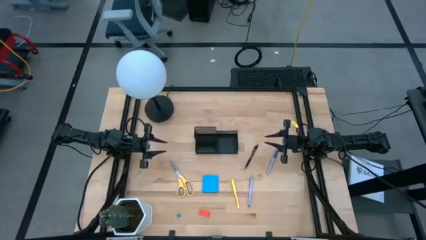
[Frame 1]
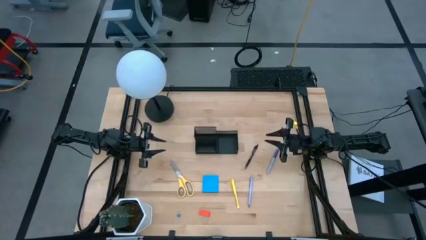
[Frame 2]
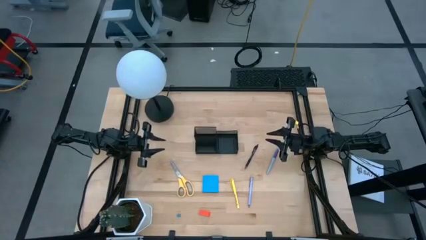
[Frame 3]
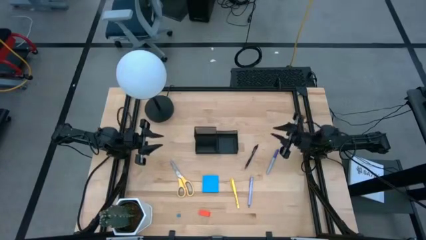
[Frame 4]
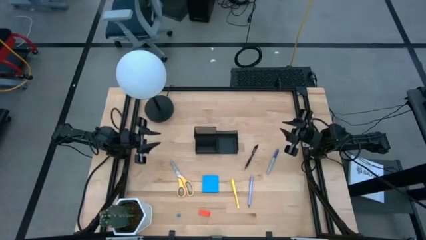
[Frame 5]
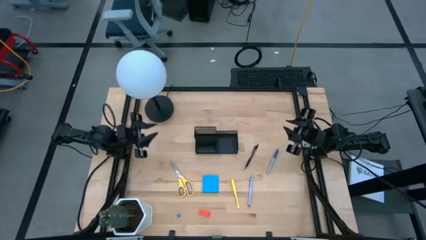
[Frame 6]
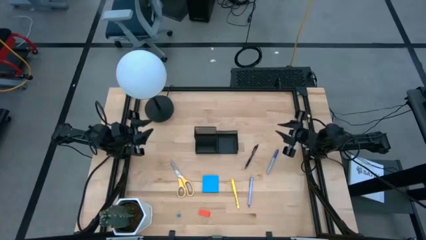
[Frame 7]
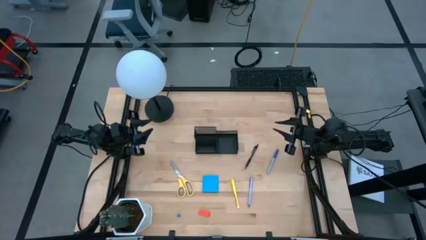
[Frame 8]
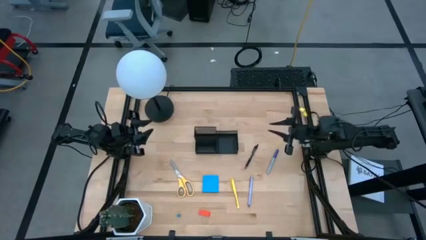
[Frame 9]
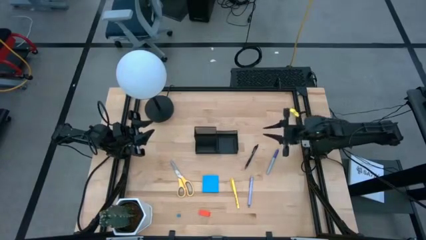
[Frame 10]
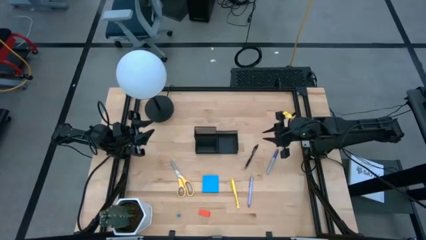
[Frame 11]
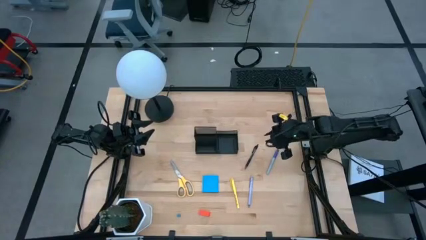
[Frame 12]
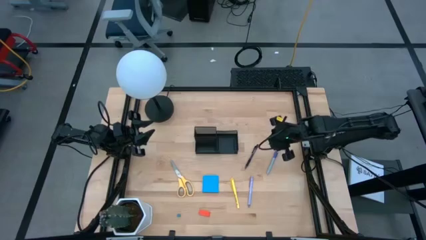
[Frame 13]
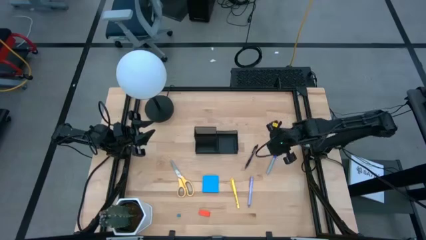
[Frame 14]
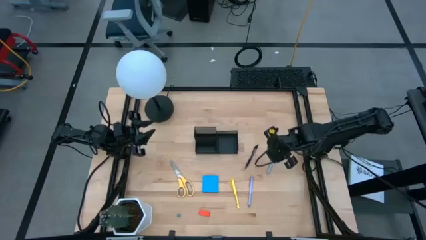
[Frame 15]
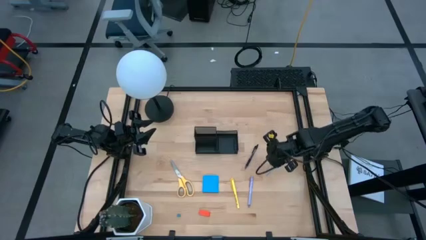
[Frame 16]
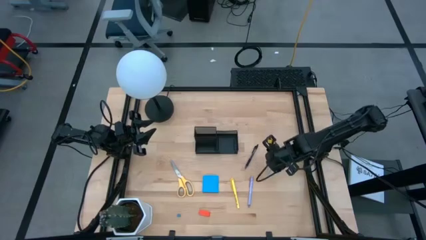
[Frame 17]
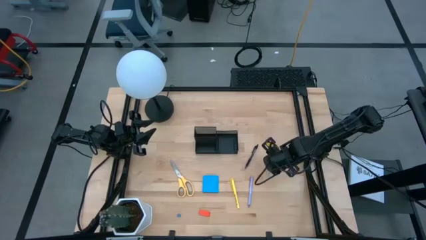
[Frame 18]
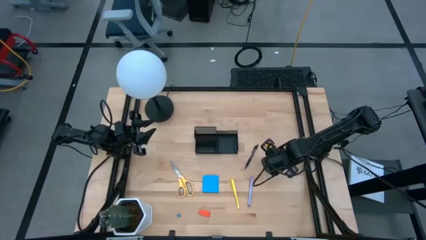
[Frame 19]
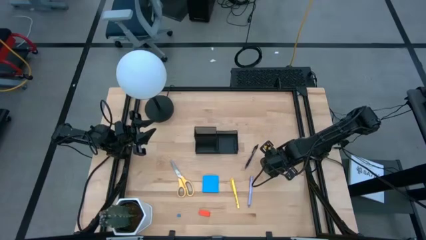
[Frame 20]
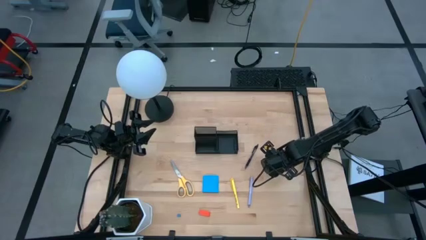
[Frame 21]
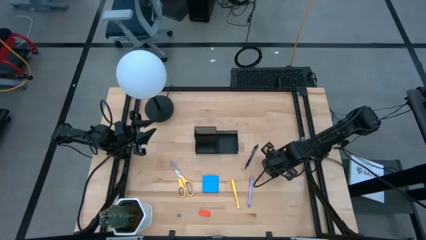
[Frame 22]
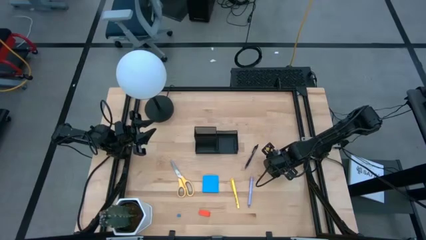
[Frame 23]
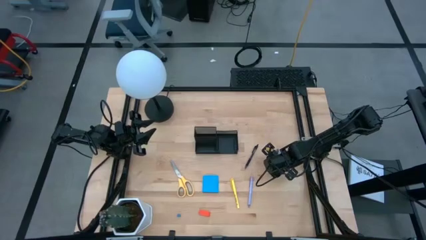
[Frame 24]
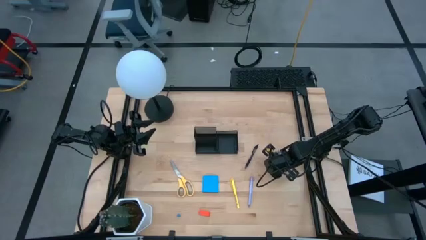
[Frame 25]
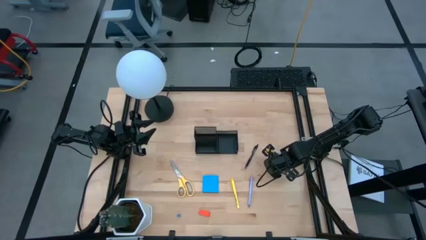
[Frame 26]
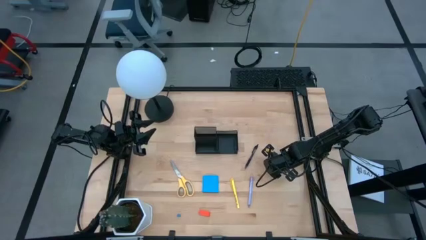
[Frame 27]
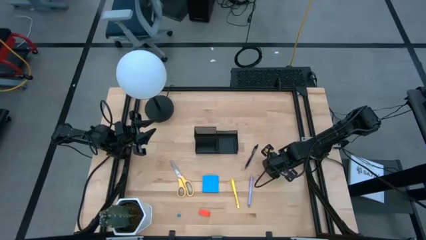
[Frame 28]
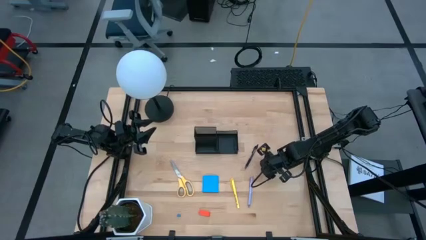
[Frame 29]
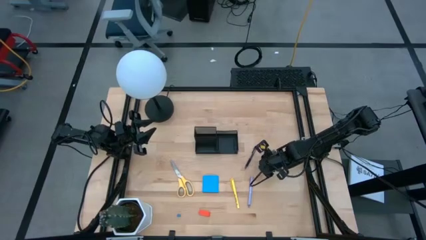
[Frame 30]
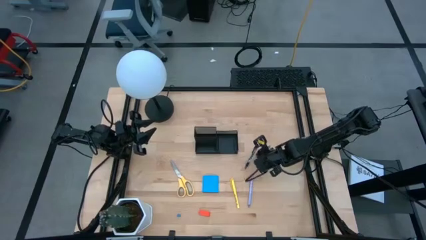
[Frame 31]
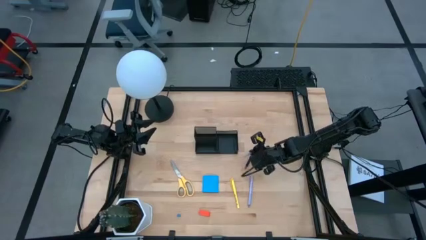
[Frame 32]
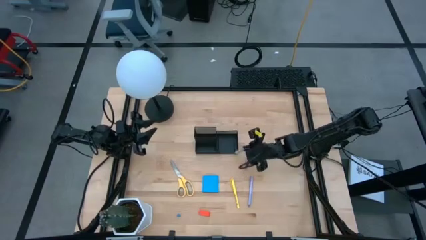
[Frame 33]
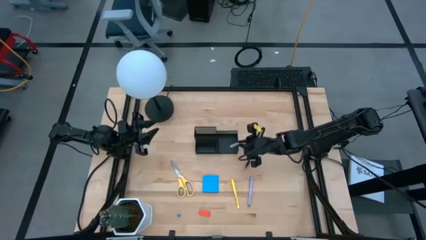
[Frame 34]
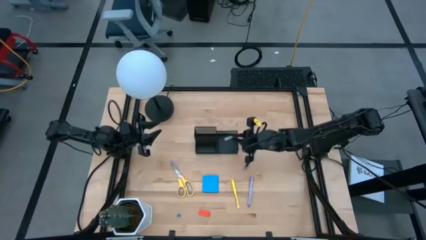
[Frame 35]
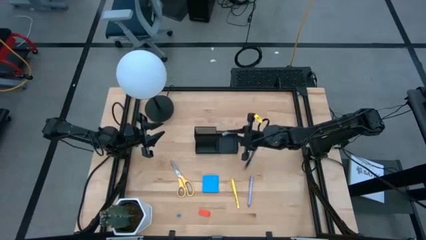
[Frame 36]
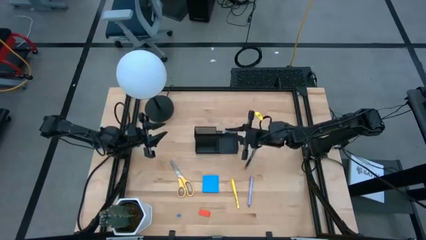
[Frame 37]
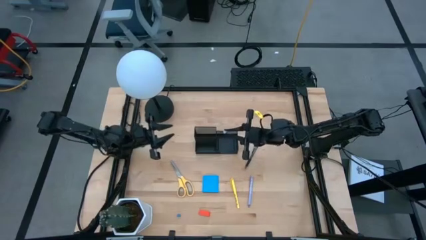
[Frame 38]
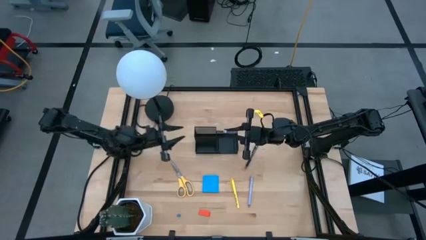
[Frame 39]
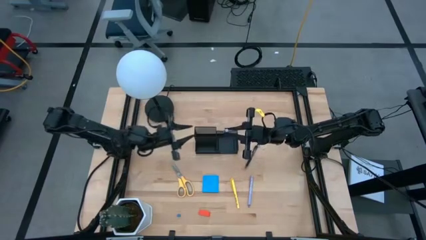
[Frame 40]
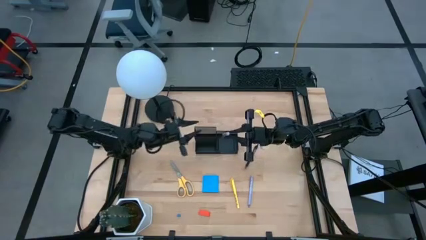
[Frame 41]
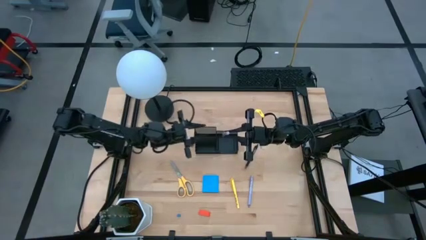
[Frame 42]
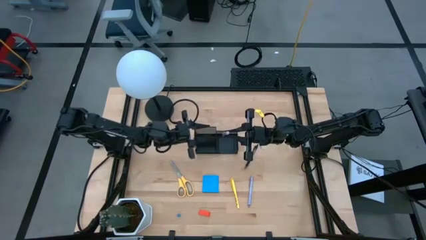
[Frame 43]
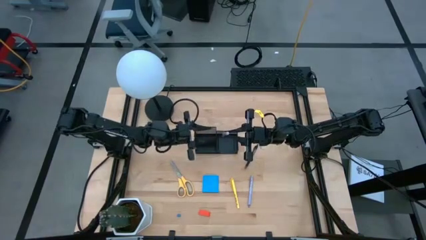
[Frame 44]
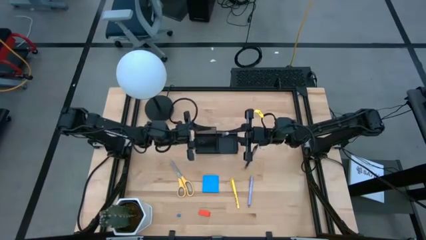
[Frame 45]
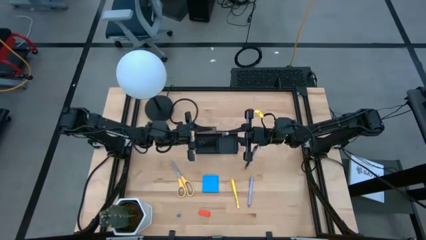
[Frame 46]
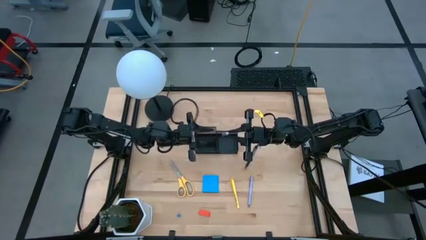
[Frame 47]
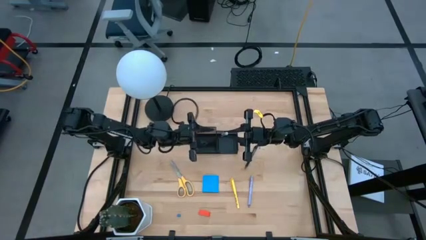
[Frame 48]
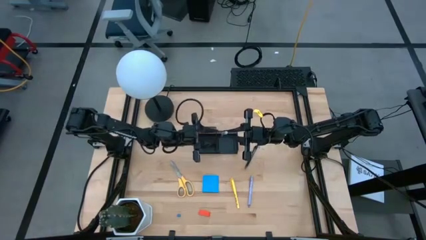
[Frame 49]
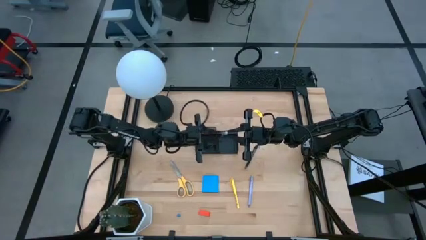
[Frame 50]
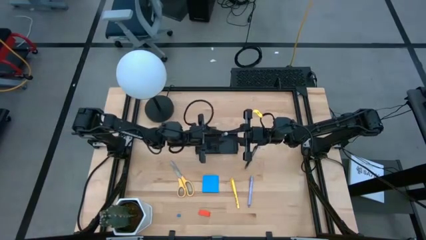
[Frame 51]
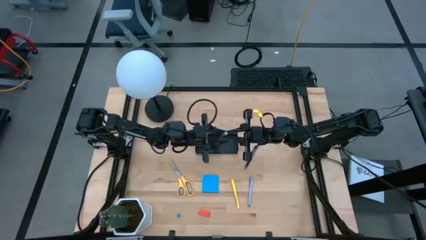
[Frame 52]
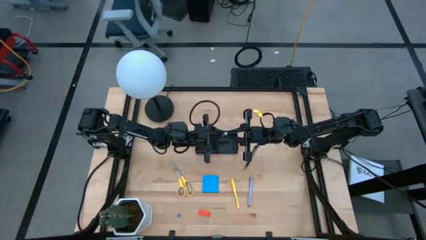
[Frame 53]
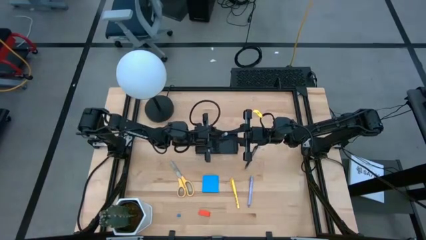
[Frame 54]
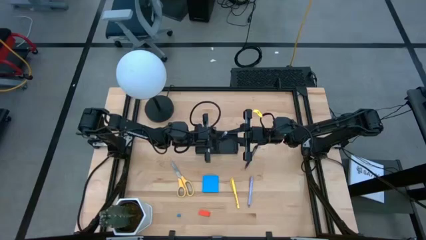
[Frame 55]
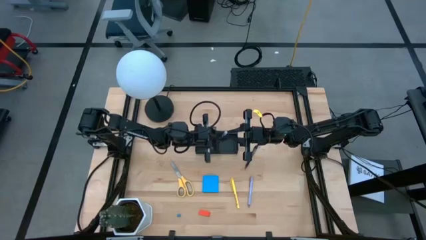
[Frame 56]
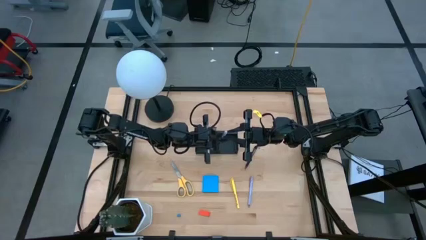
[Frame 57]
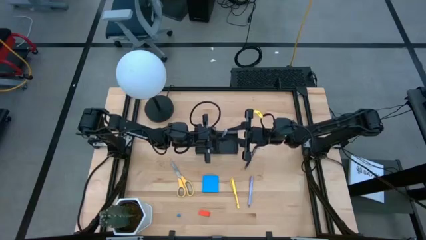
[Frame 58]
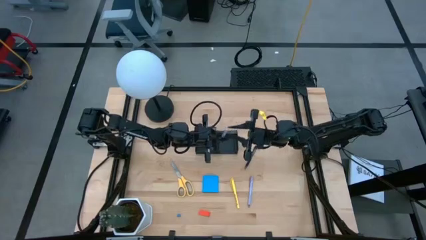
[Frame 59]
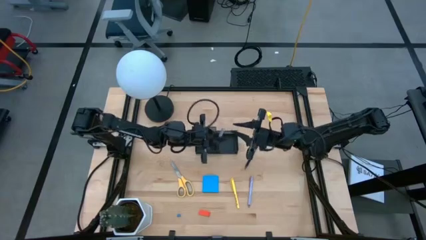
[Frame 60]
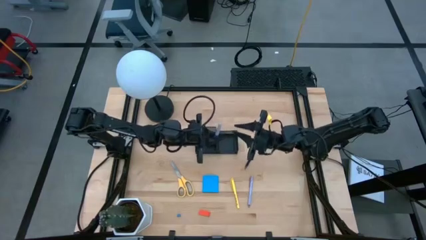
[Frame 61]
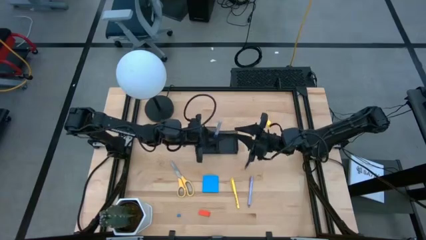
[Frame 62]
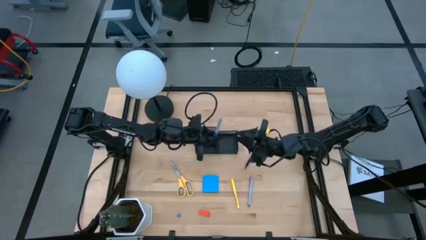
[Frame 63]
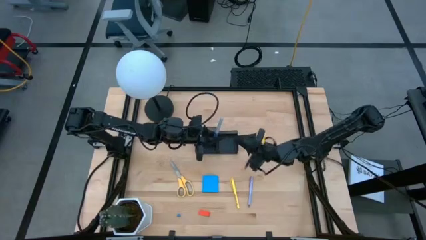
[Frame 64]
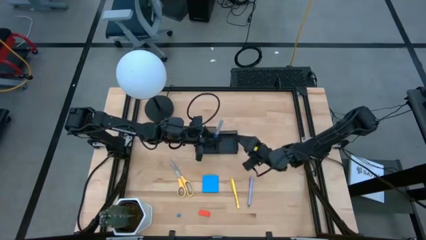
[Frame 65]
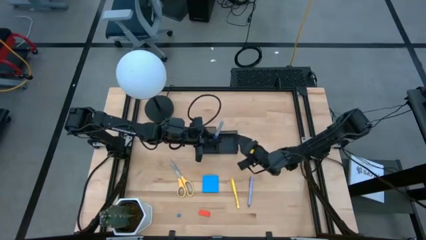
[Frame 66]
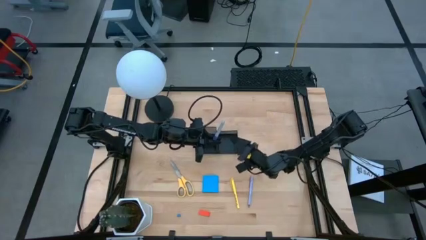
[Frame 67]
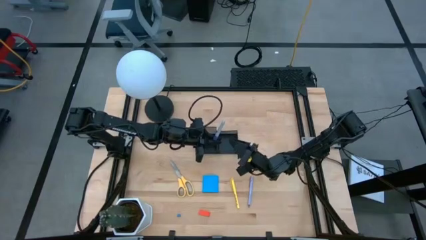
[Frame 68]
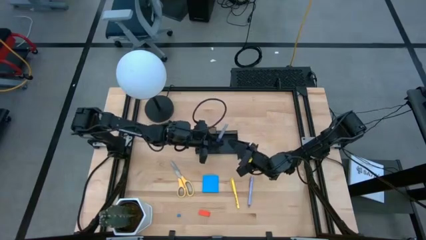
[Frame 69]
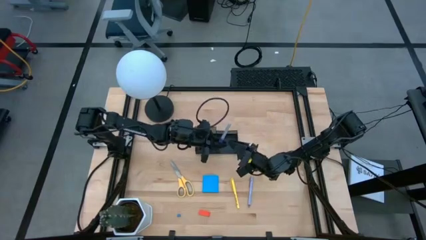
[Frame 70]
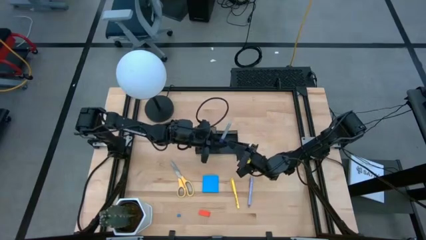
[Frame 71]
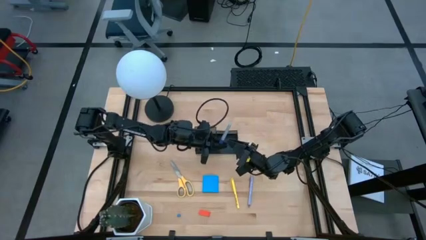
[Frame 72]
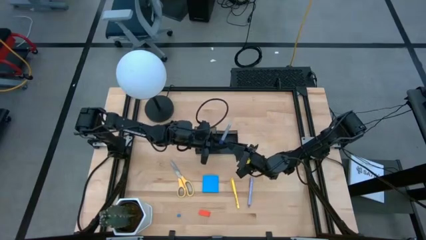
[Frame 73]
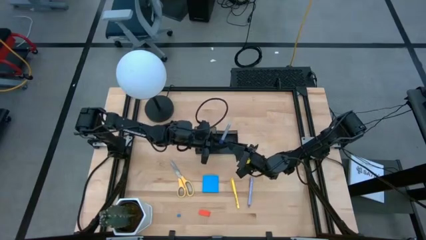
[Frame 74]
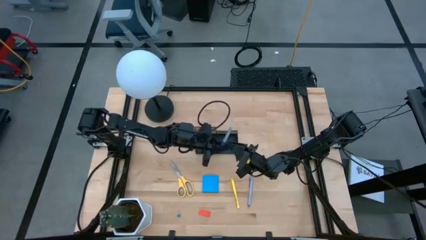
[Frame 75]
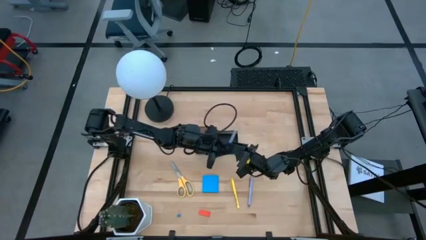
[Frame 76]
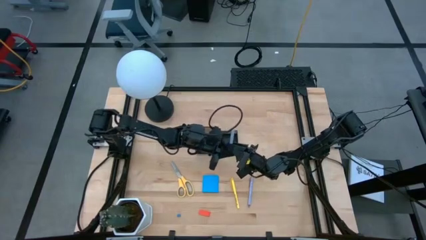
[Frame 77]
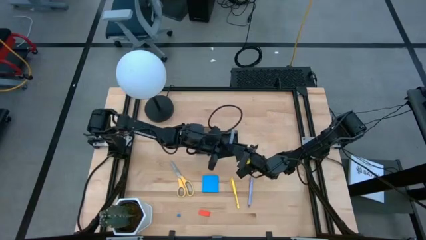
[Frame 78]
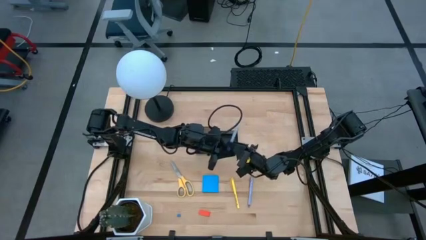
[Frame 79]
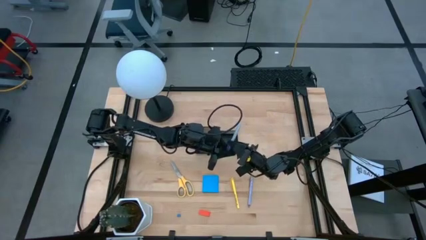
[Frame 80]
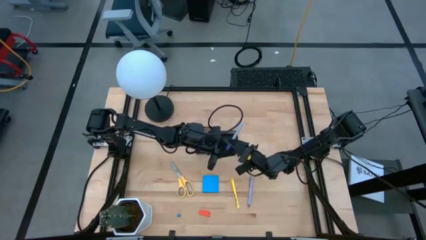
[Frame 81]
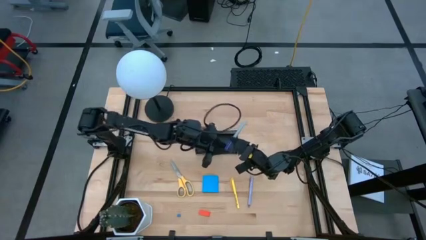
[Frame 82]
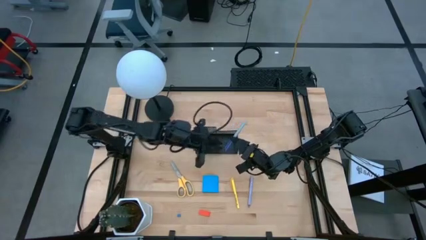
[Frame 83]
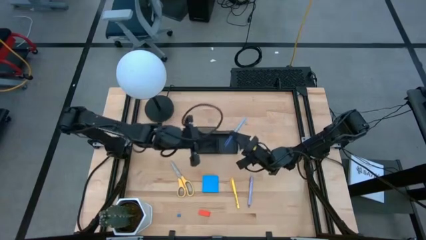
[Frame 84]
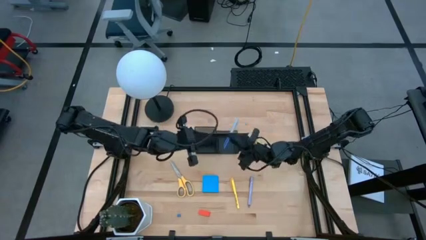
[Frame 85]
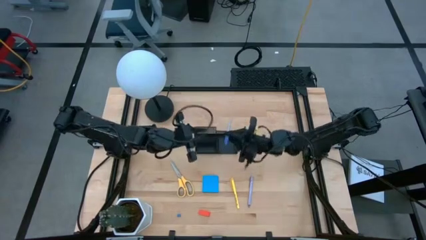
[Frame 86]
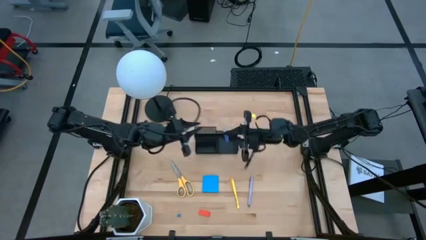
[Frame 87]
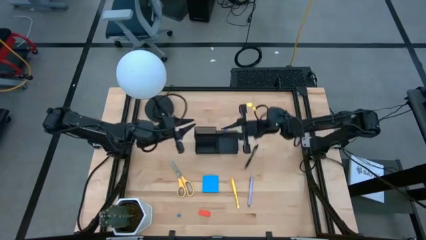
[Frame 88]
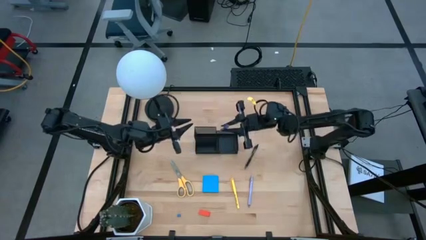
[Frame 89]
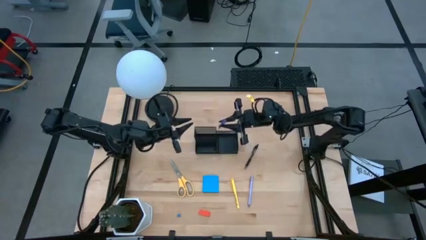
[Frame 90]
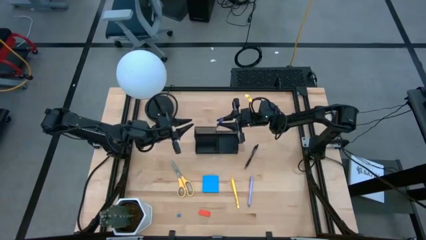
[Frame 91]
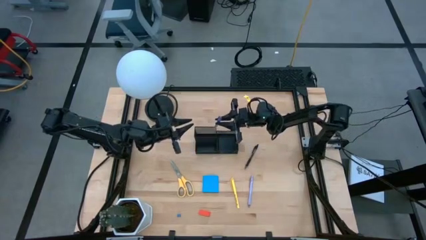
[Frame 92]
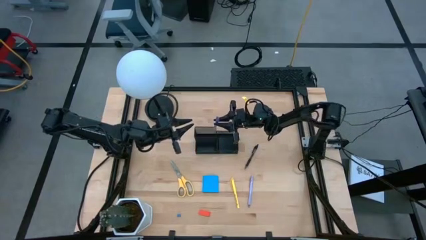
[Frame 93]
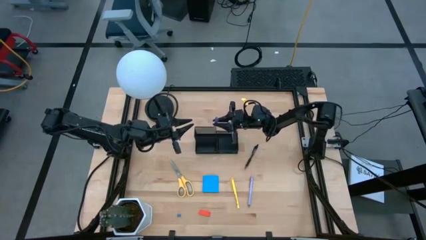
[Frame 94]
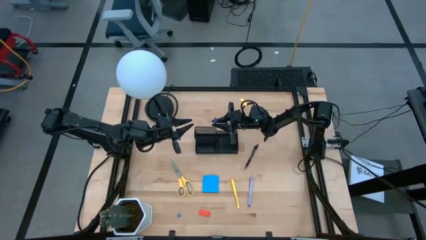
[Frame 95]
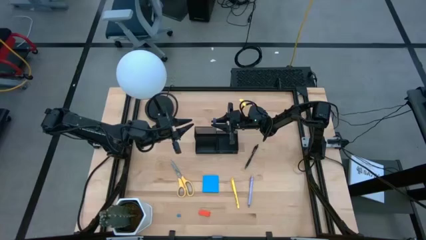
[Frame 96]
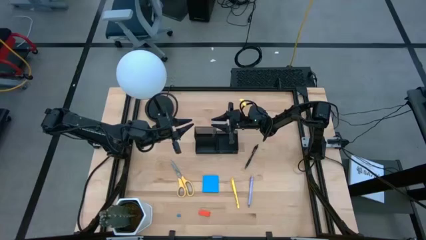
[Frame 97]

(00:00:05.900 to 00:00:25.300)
Task: Pick and place office supplies into organizer
Put the violet marker pen into the desk organizer
